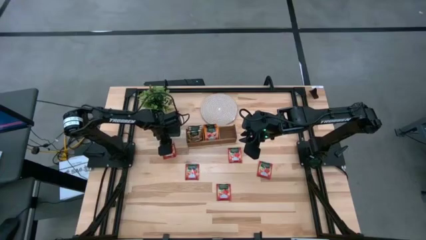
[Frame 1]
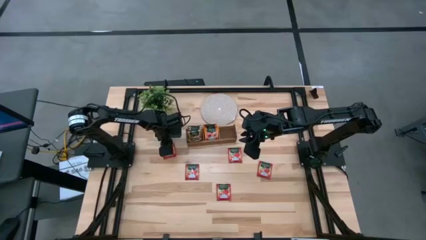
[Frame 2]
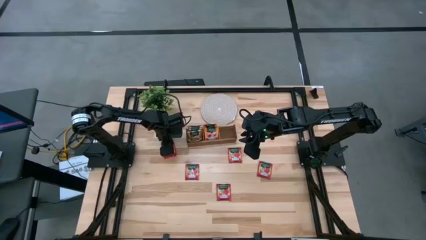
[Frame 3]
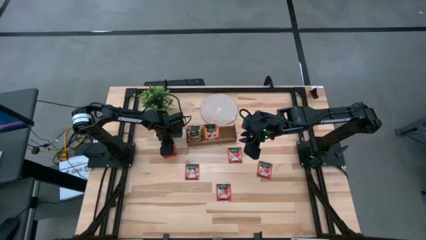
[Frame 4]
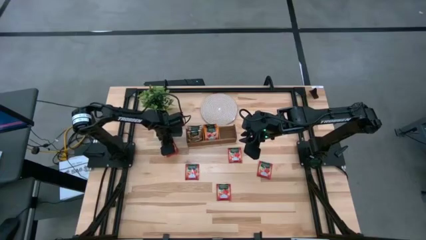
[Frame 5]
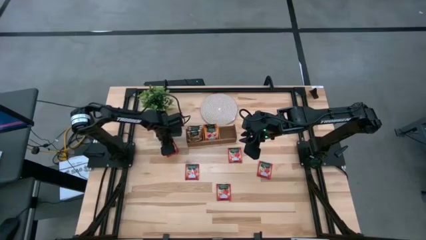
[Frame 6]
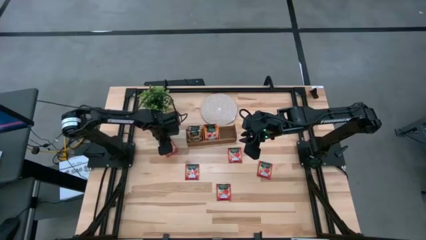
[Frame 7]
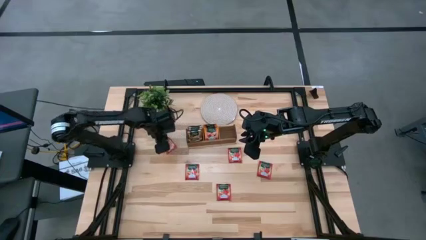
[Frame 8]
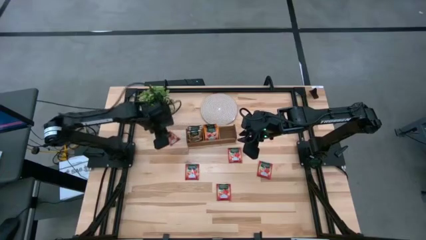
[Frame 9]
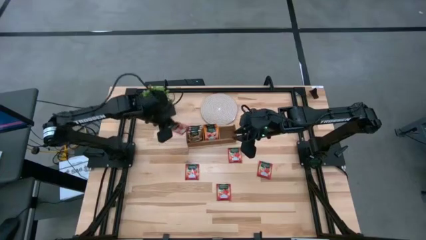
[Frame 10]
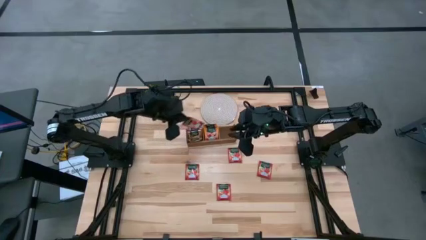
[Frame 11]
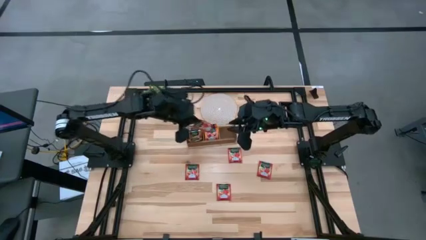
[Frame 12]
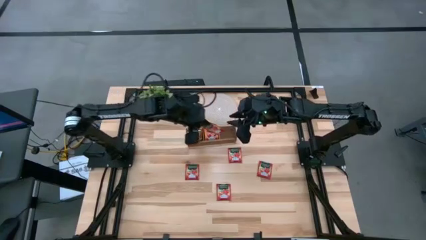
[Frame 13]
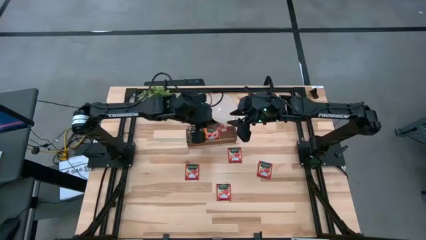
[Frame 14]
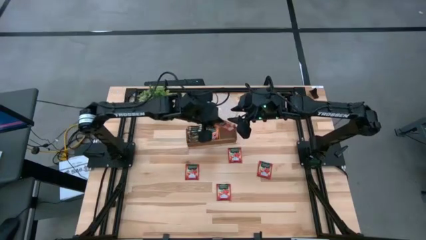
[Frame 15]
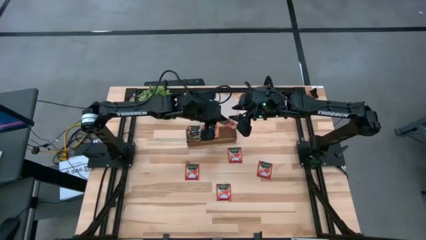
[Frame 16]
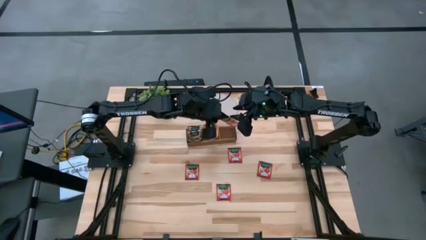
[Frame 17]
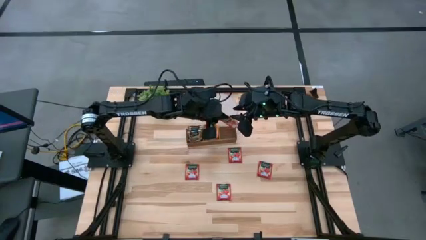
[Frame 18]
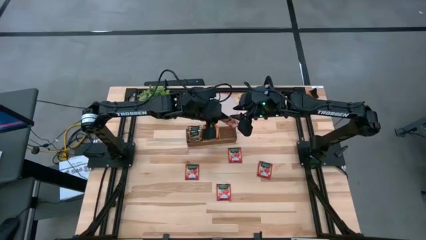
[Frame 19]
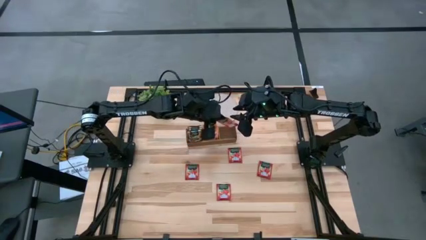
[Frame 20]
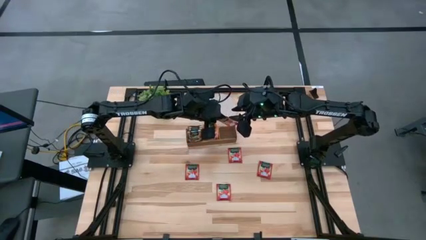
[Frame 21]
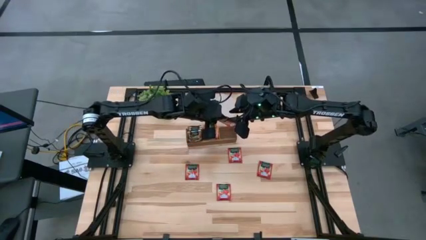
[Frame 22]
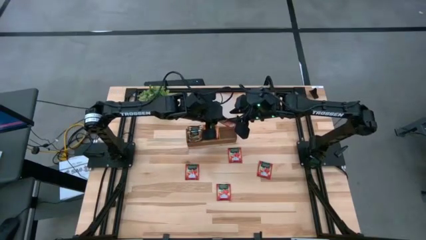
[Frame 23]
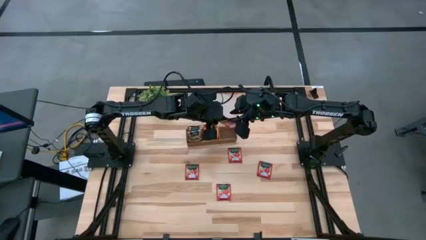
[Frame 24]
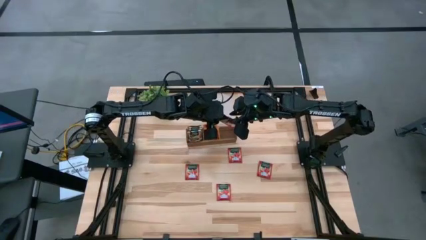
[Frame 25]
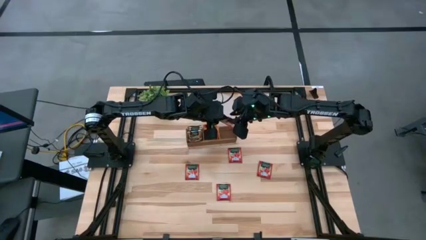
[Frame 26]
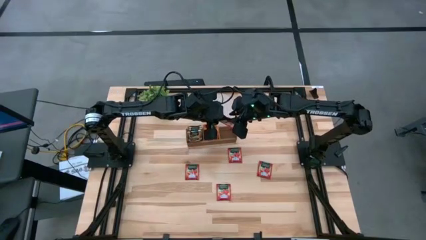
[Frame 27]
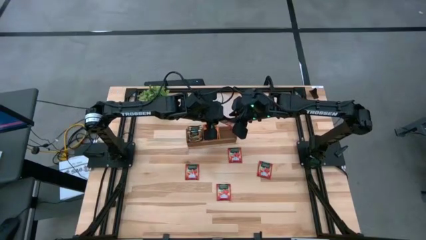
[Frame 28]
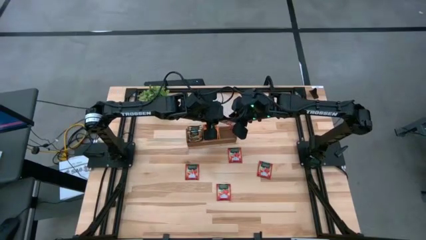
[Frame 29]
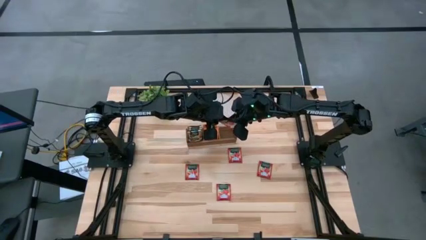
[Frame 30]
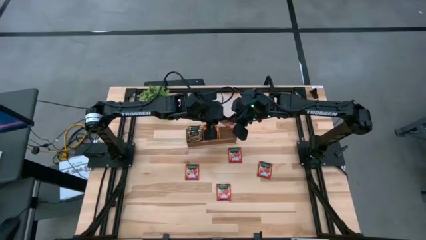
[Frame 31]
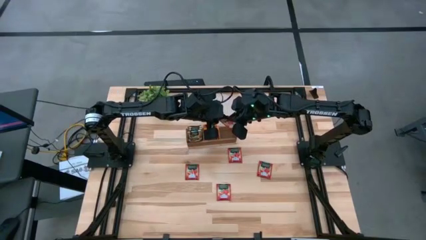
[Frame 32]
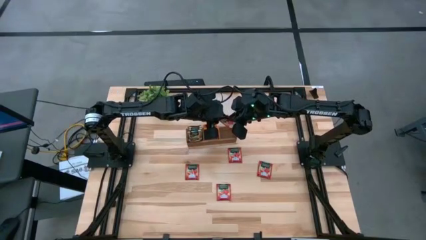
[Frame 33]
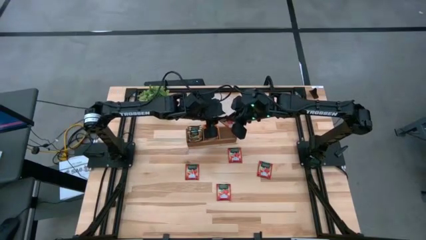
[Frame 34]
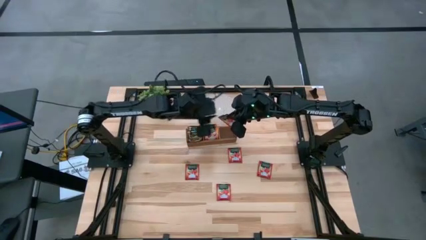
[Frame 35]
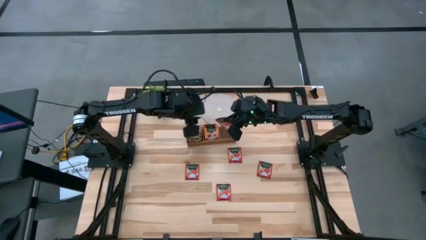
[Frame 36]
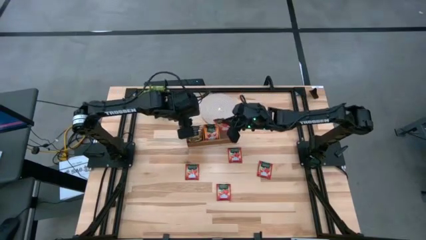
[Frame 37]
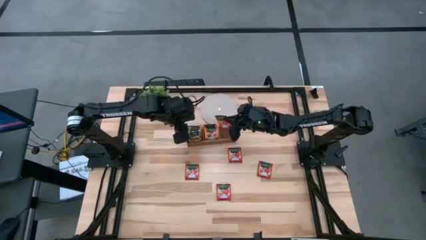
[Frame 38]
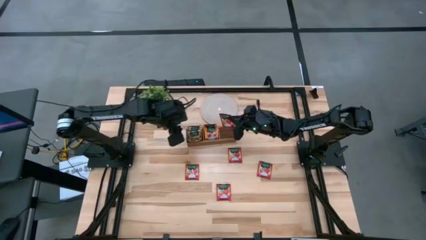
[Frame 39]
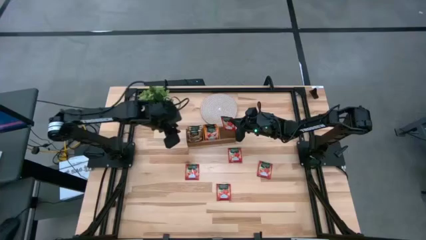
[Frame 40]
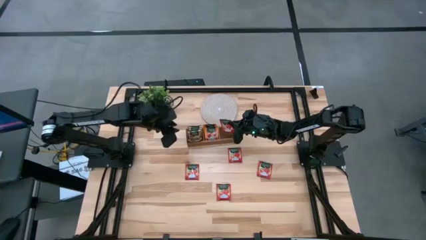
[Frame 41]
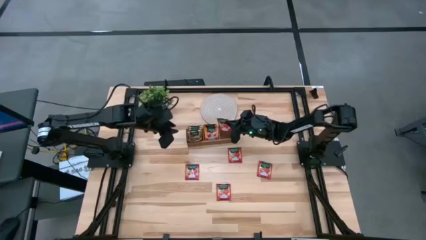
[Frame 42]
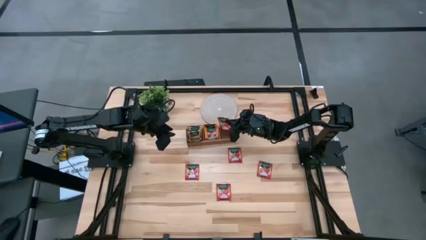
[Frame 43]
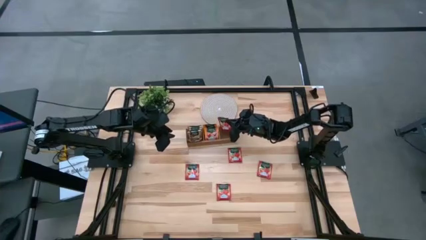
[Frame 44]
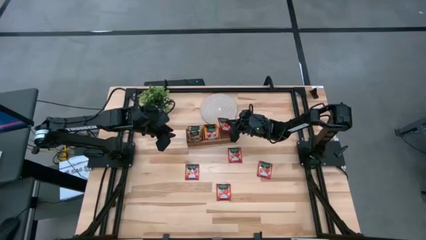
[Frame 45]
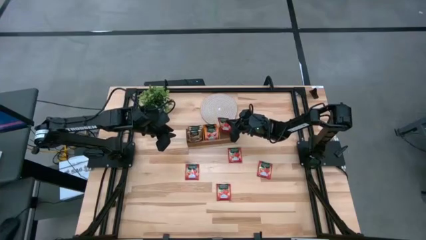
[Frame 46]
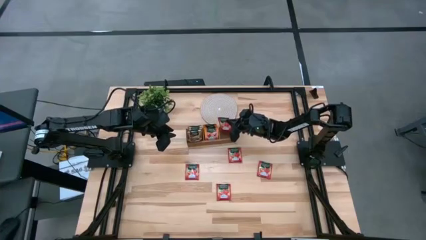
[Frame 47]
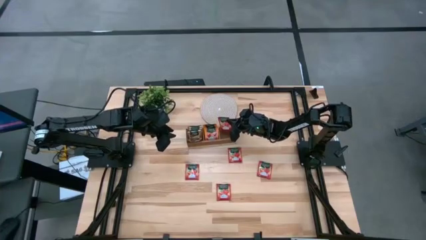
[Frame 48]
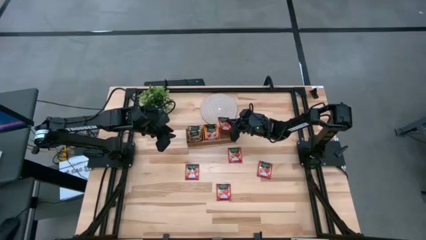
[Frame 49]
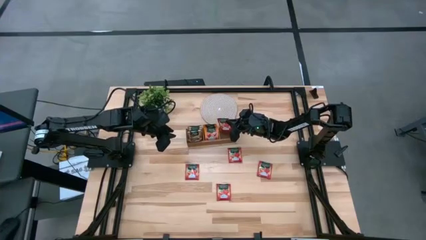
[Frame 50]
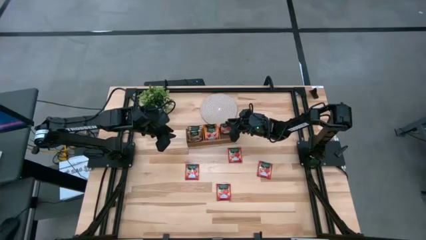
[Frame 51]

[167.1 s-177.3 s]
Task: Pick & Place Tea
Put the red tea bag into the right section of the wooden organizer

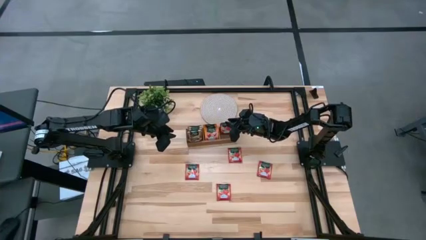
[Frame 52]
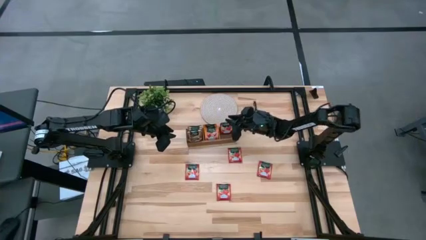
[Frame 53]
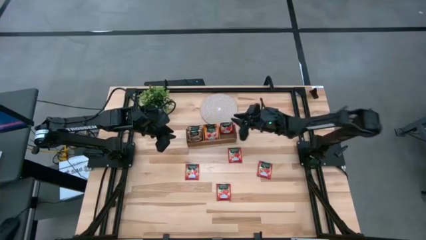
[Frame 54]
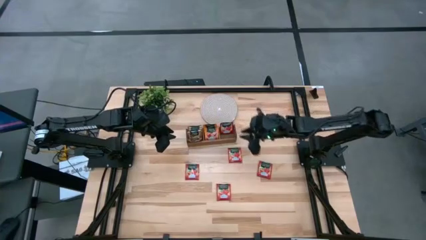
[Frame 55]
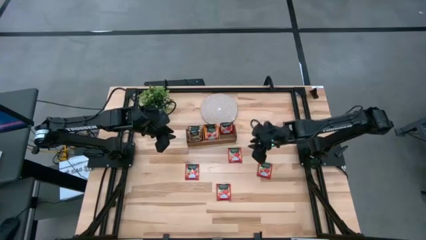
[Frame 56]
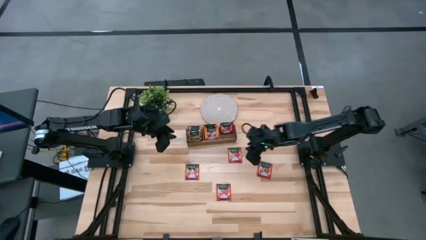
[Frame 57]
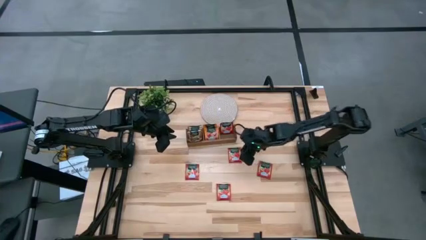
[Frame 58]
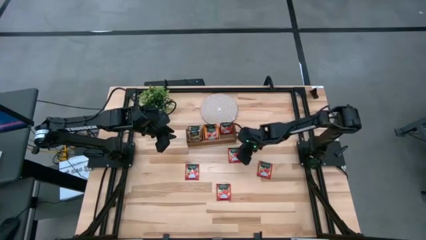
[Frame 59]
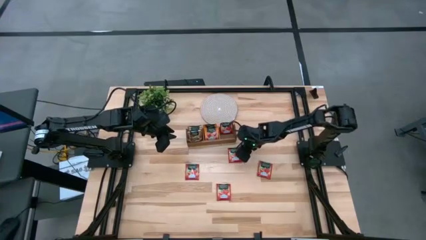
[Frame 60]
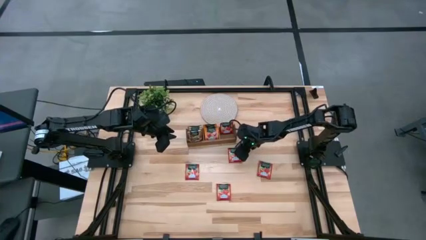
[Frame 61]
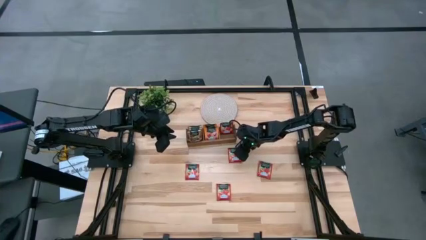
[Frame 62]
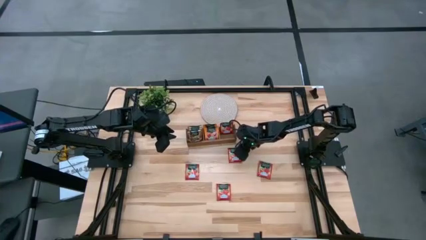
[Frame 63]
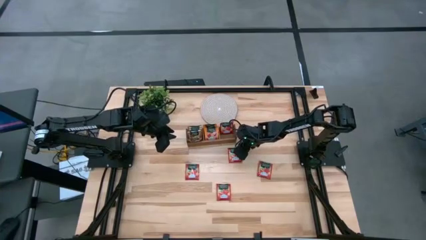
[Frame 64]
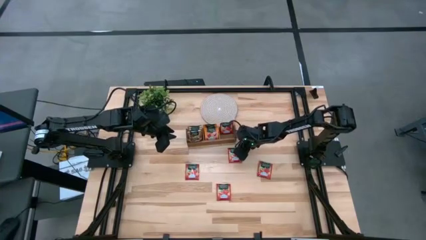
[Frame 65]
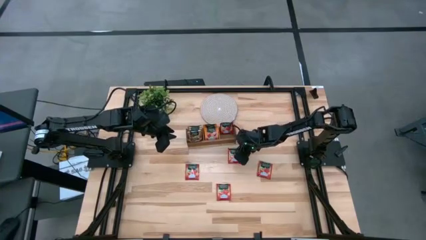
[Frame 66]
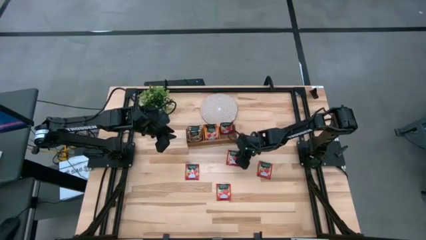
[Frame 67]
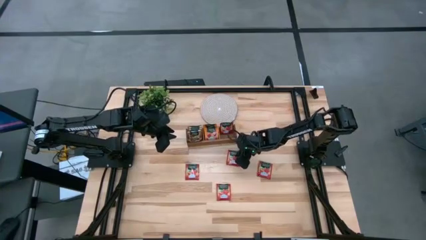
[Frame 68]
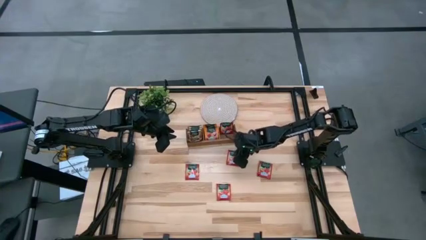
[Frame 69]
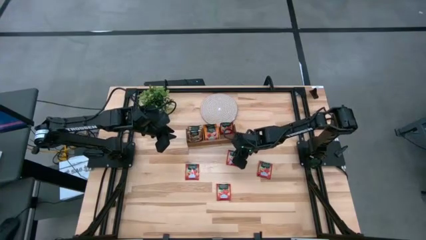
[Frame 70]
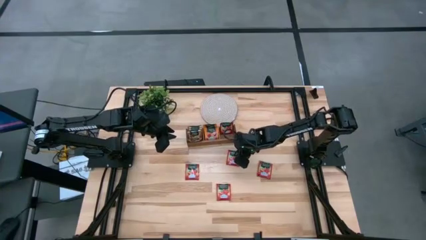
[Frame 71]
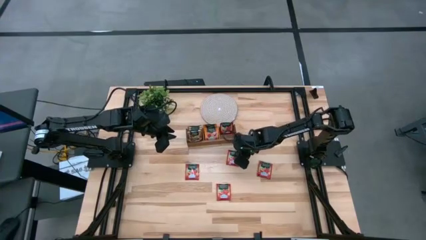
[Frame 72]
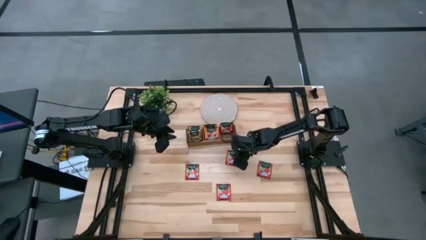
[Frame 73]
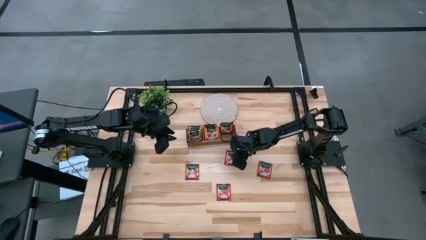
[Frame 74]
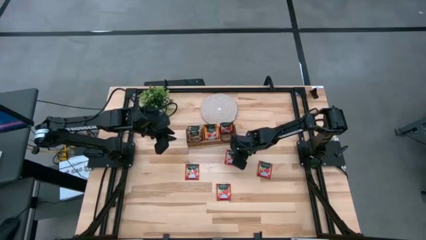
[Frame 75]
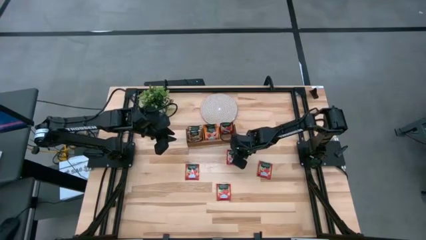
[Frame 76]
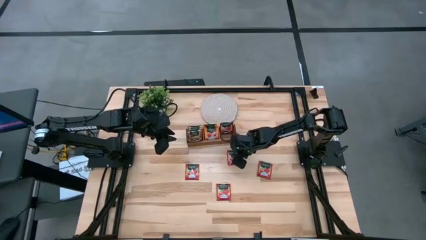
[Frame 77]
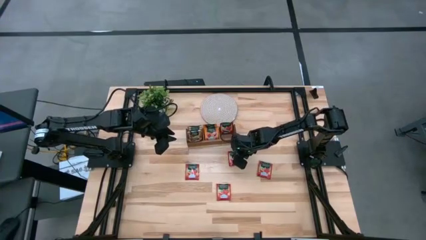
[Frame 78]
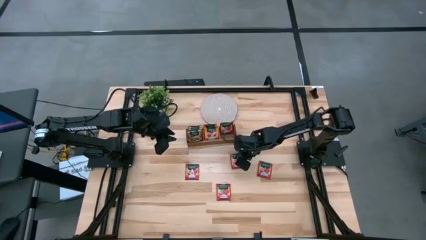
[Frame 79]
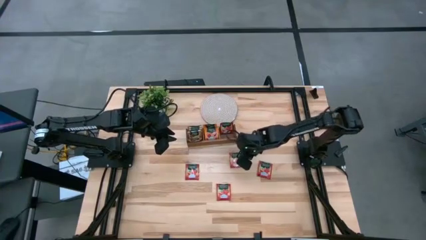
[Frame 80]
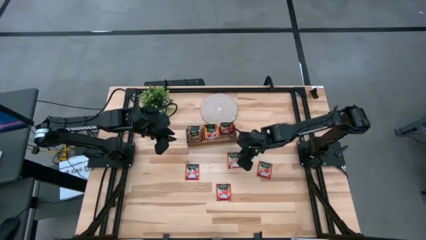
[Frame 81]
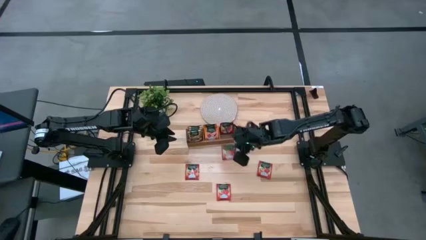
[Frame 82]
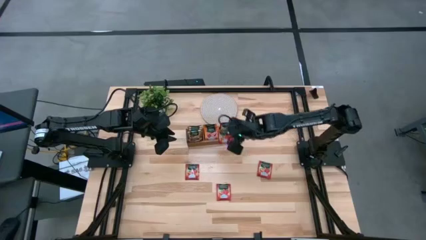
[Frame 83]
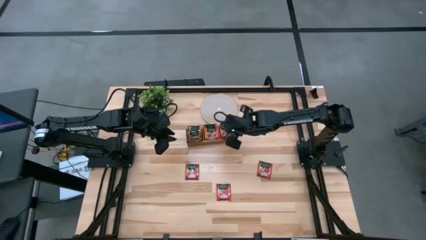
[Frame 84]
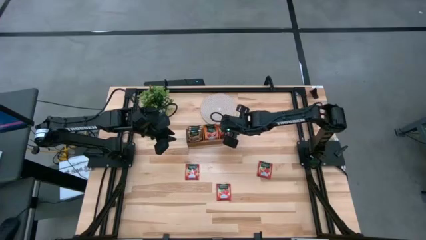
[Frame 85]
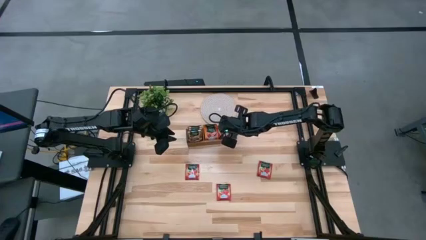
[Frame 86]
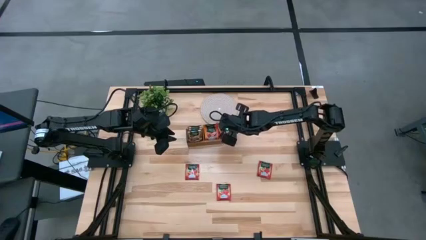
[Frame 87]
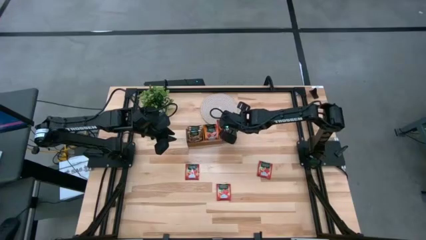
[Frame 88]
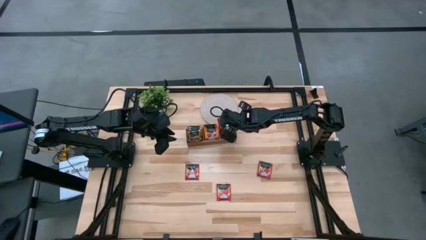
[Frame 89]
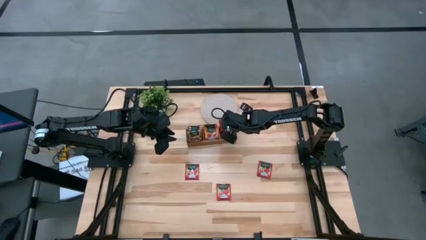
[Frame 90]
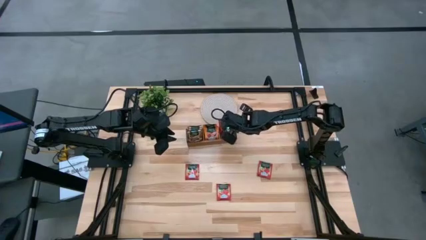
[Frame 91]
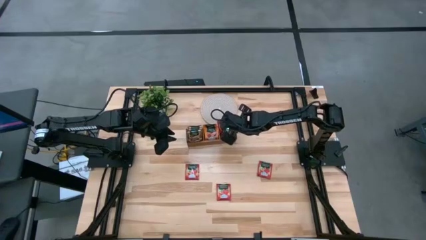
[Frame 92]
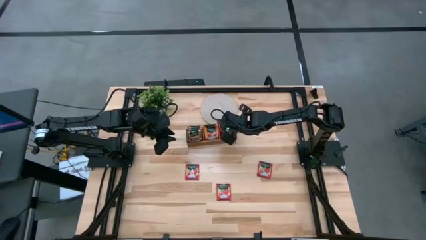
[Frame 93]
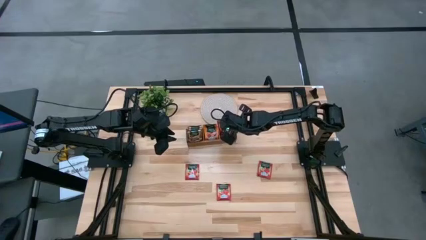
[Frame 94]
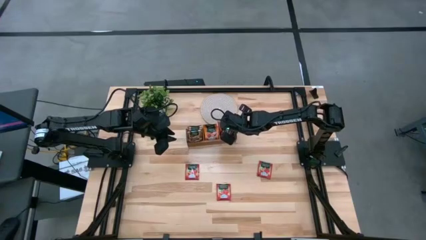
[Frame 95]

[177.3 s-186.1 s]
Put the red tea bag into the right section of the wooden organizer
